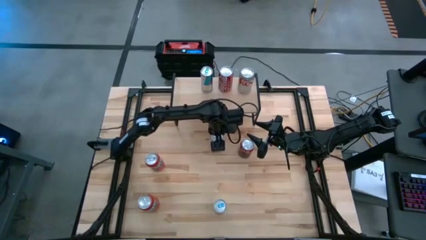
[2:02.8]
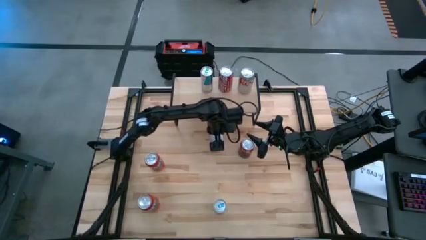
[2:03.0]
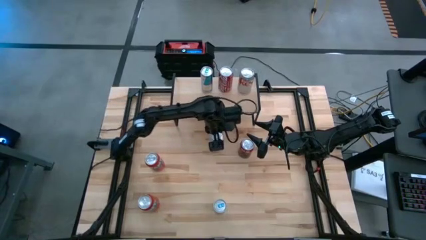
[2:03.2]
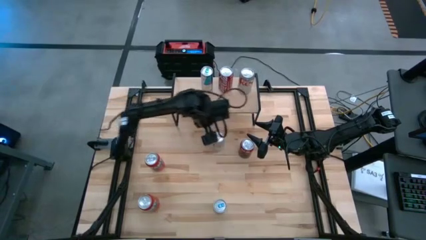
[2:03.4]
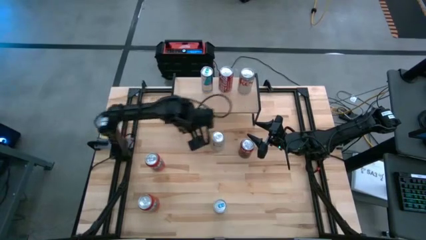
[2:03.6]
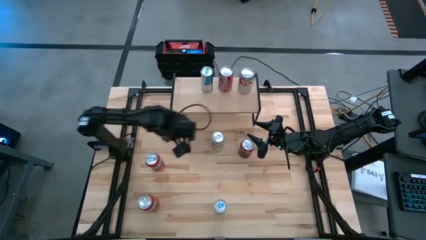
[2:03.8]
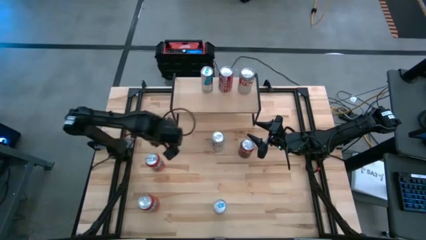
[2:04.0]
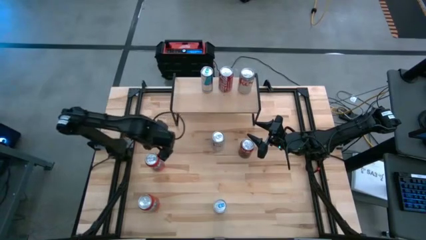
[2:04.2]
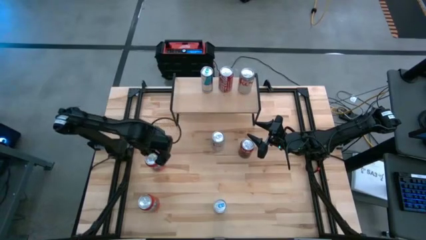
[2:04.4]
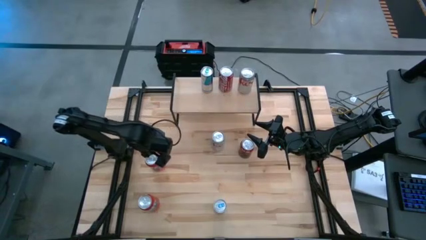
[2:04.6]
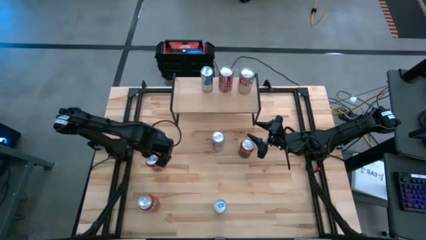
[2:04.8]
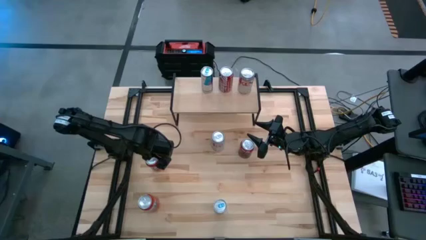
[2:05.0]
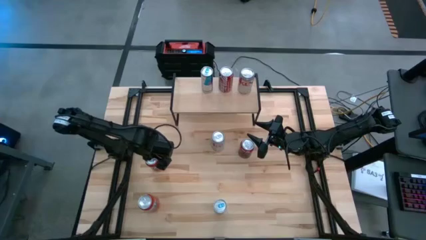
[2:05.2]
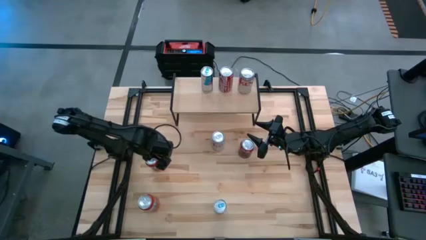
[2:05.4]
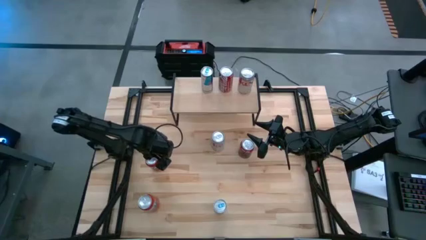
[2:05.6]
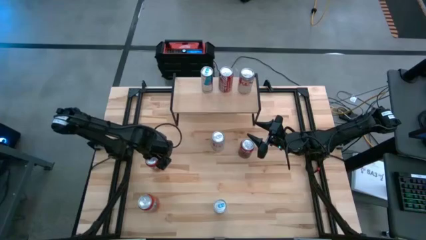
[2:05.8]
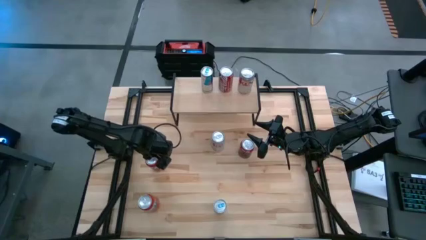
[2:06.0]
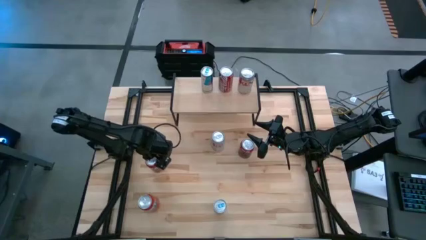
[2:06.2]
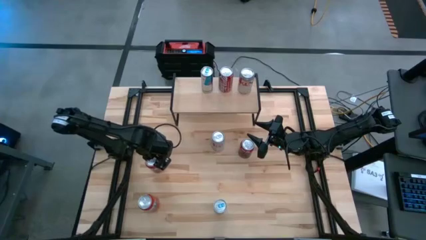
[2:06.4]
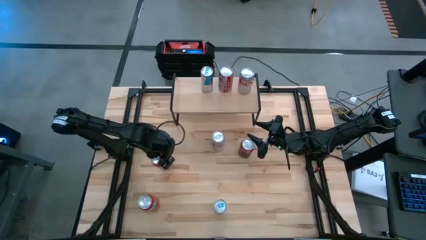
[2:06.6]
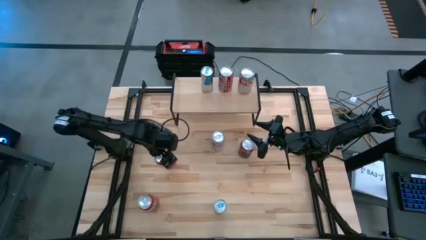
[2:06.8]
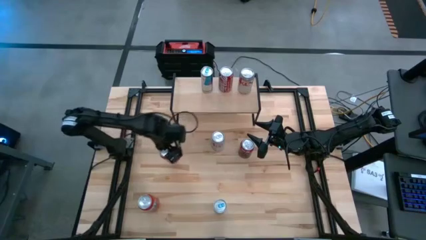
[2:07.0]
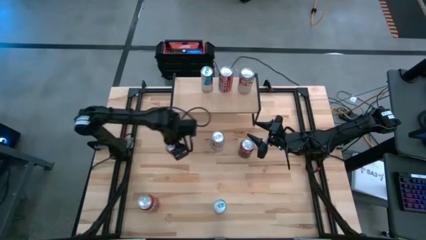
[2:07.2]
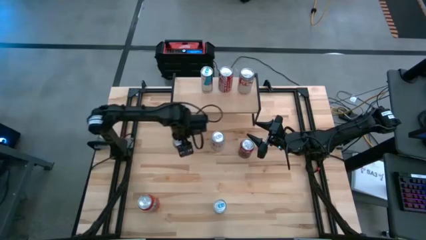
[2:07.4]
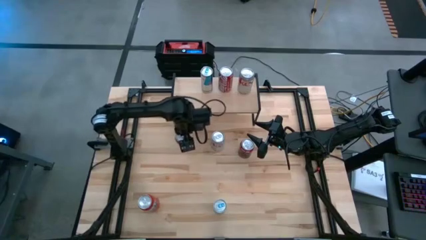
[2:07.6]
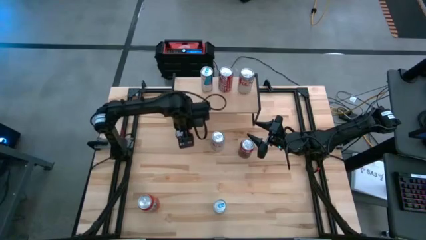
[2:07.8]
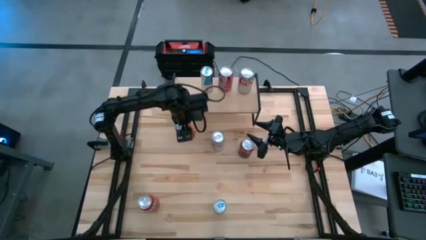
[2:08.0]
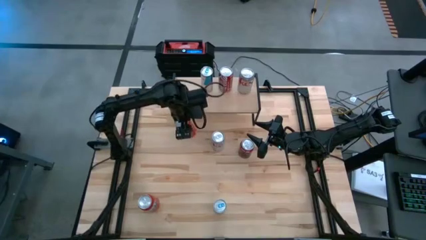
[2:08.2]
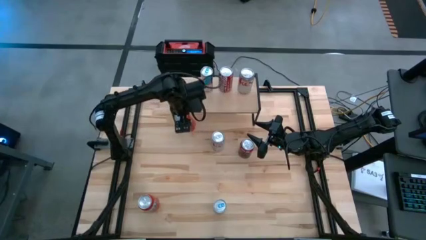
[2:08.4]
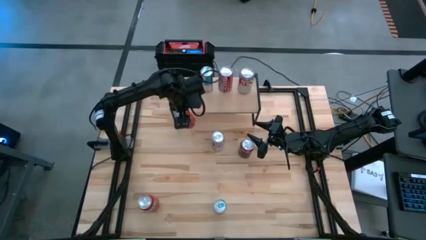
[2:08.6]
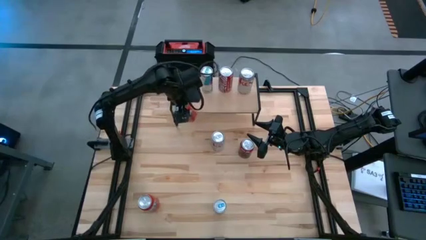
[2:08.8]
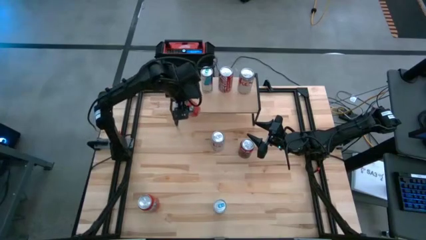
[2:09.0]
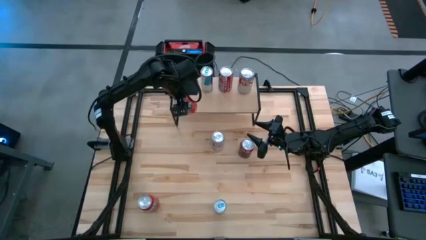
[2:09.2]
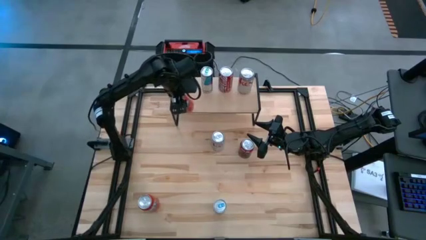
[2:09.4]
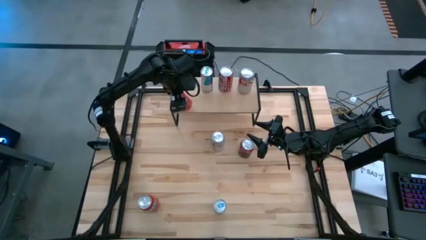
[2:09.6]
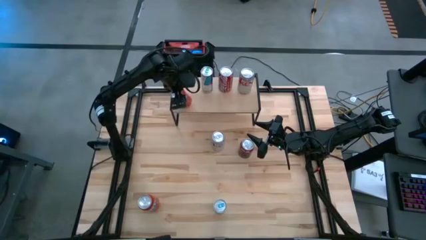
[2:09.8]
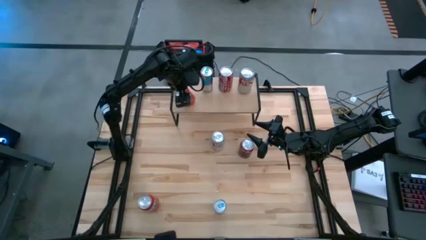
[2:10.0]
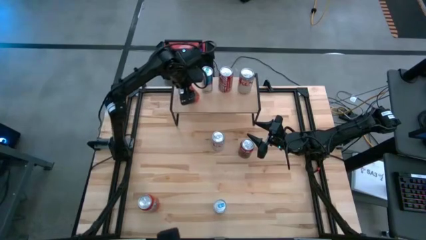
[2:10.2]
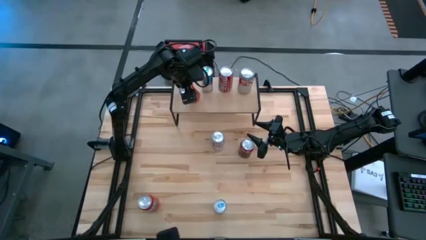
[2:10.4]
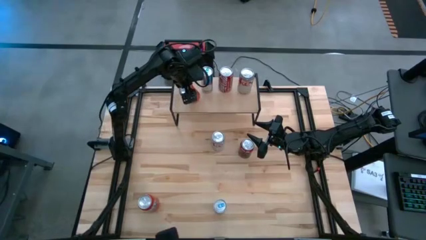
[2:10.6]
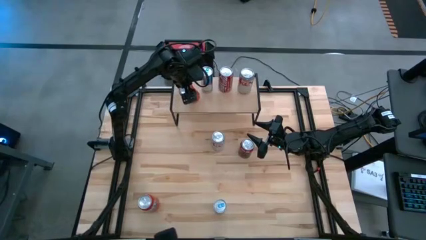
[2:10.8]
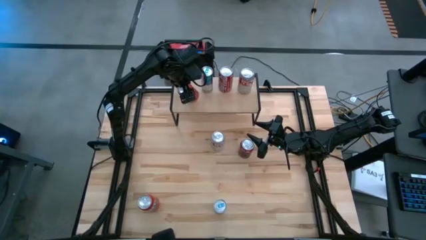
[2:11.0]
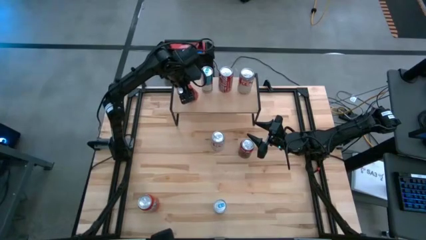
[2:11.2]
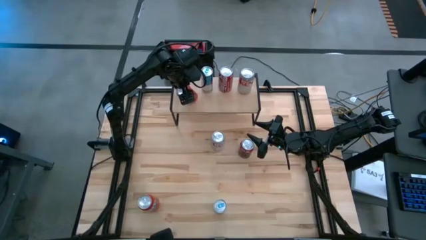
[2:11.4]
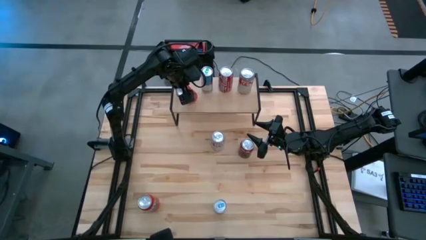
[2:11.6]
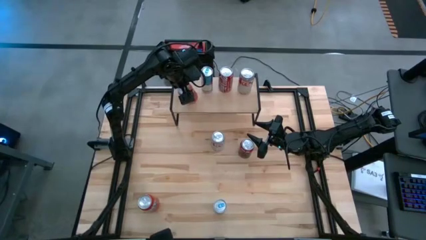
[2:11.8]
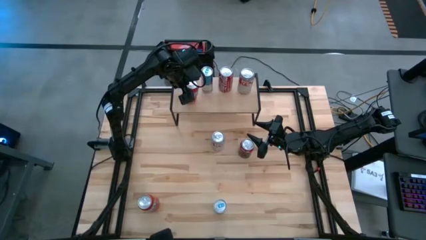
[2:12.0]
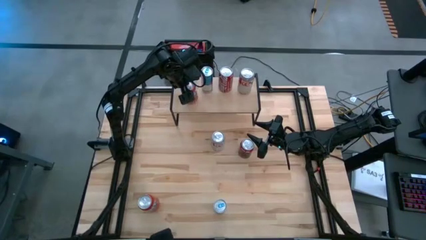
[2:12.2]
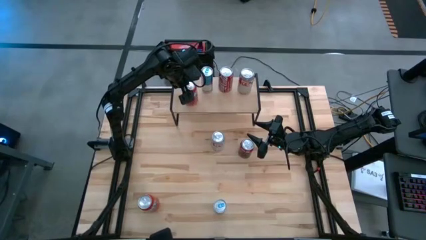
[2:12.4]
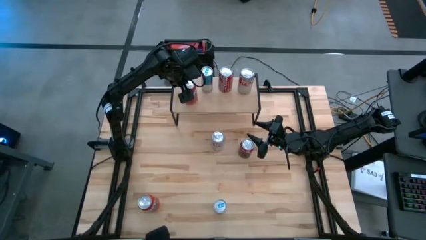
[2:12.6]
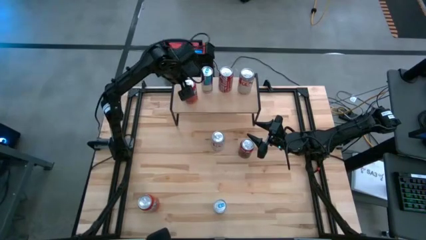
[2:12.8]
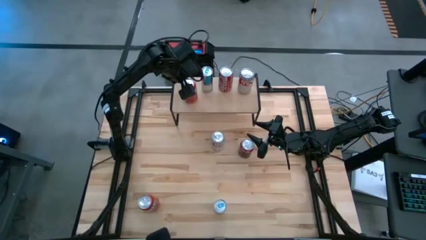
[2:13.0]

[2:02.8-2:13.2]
Task: Place canned beverage on shelf
Put the top red soda can on the shelf

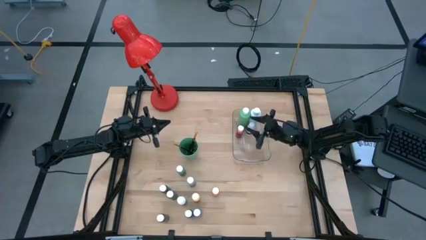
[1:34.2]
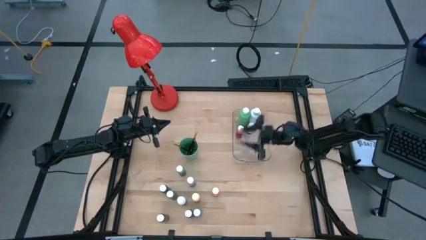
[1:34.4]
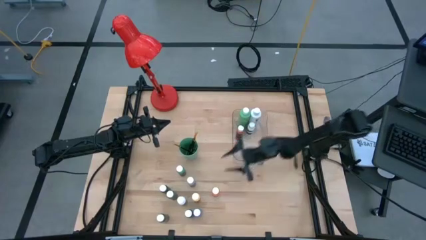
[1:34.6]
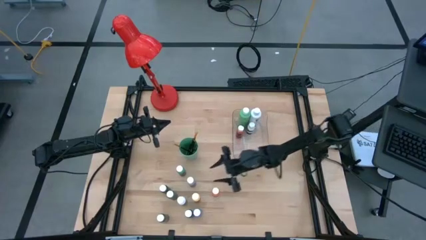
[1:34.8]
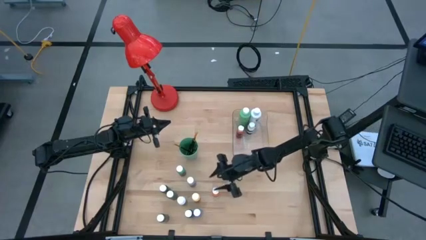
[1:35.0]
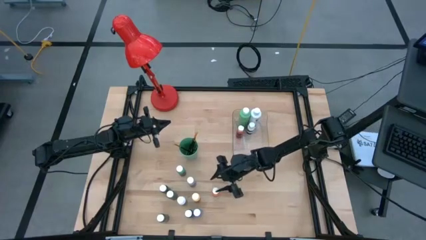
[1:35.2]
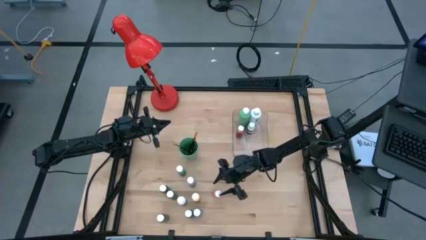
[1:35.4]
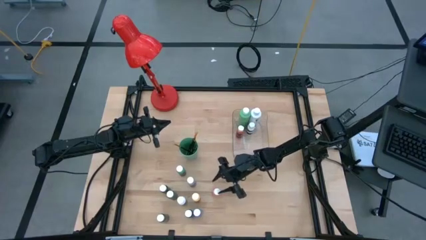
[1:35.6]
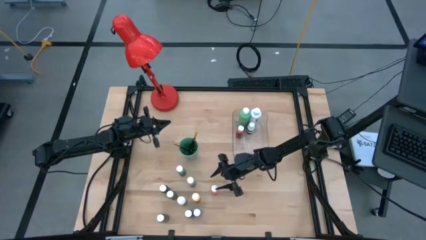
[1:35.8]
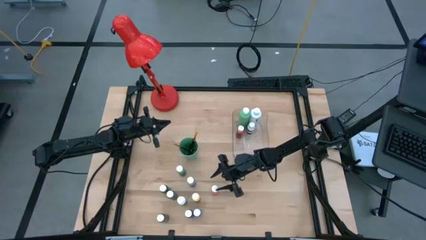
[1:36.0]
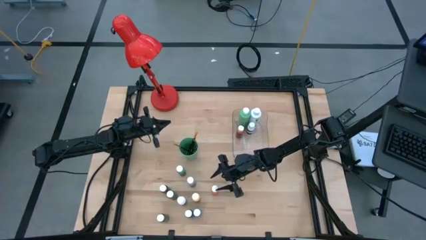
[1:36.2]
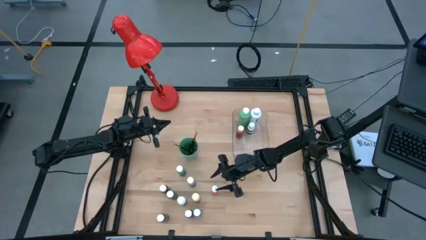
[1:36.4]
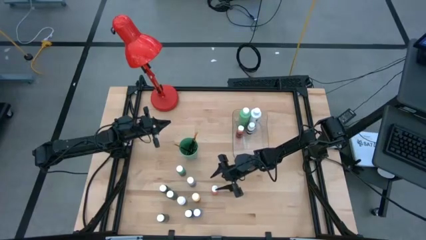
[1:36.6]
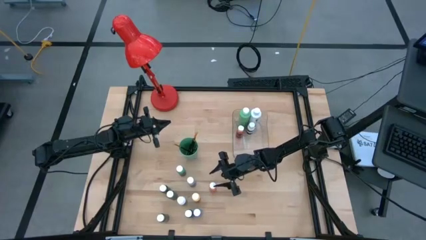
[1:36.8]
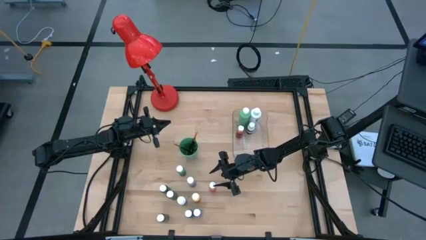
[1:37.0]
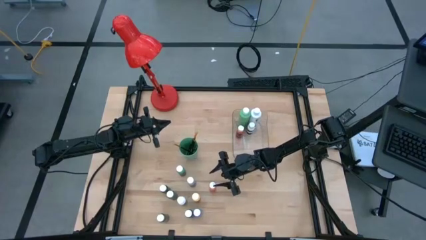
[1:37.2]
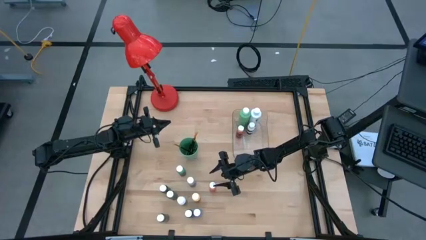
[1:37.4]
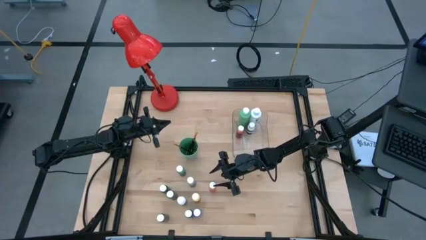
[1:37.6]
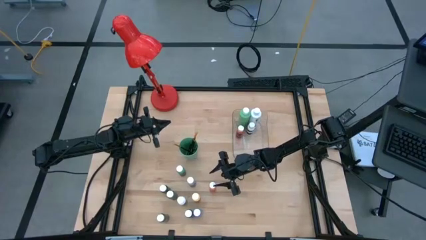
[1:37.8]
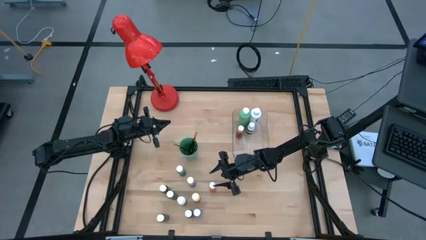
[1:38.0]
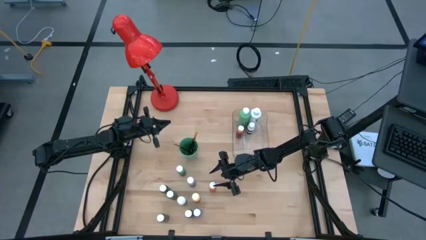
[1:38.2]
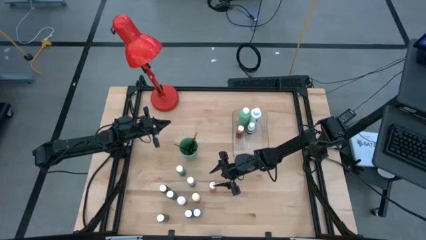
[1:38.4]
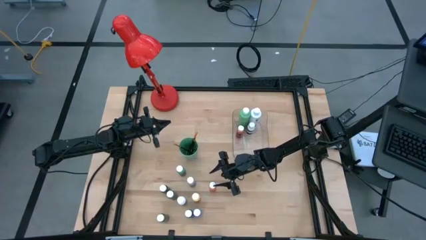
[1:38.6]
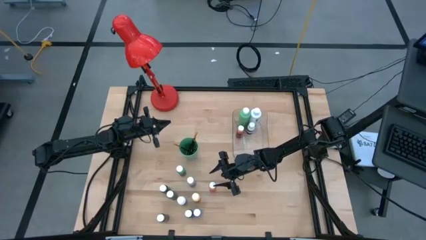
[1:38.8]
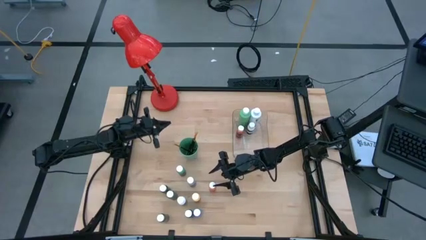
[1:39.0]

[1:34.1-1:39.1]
Task: Pick & Place Paint Supplies
Put the small orange paint bottle into the transparent bin
